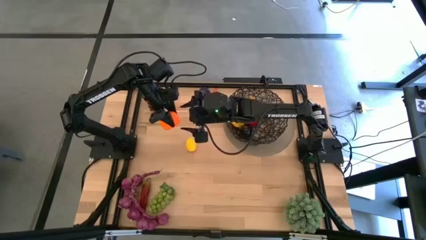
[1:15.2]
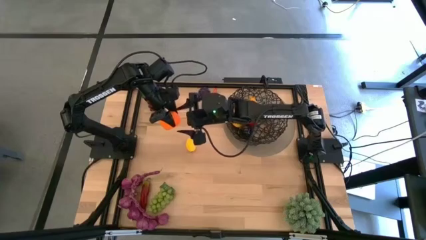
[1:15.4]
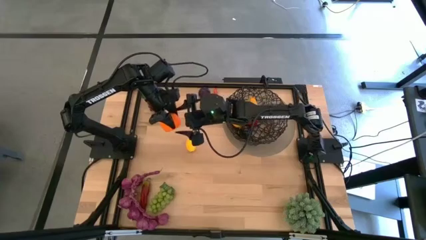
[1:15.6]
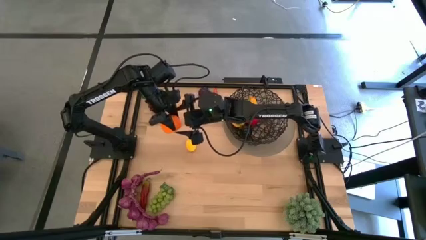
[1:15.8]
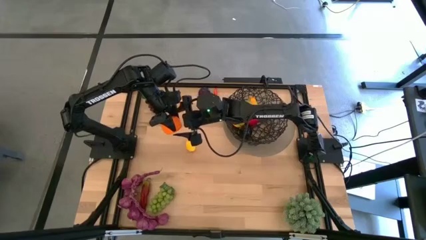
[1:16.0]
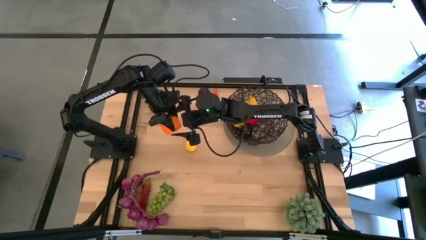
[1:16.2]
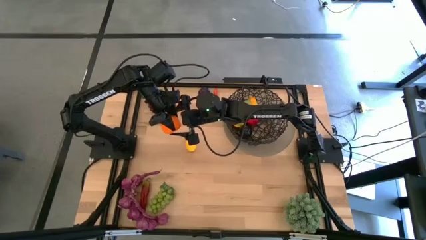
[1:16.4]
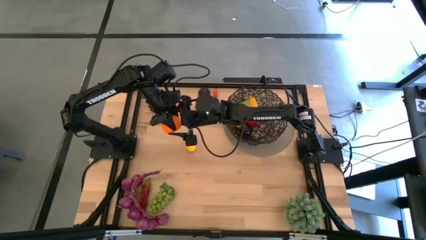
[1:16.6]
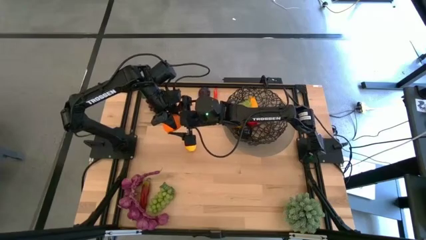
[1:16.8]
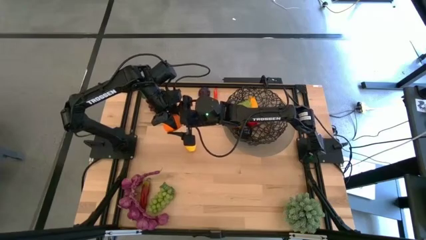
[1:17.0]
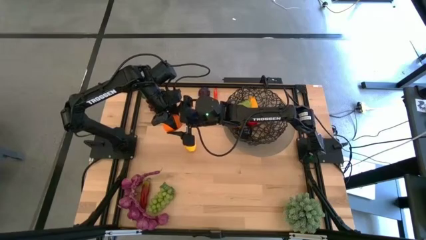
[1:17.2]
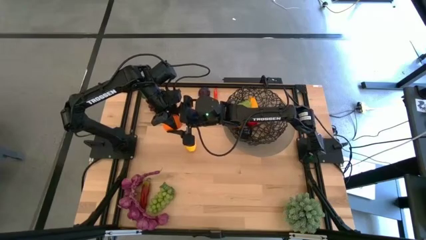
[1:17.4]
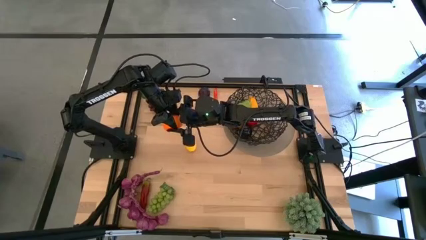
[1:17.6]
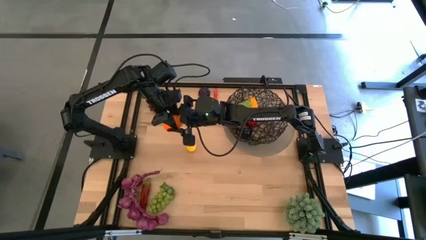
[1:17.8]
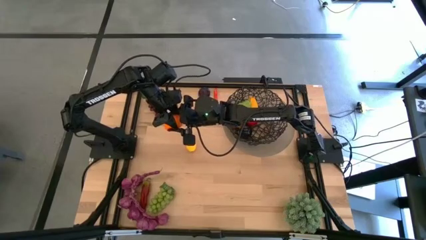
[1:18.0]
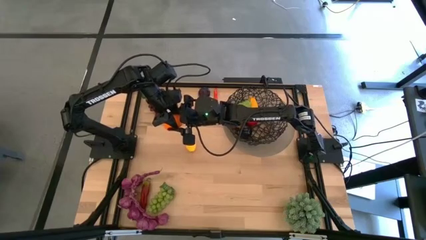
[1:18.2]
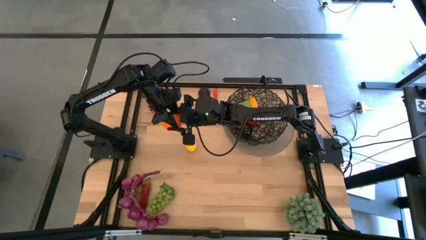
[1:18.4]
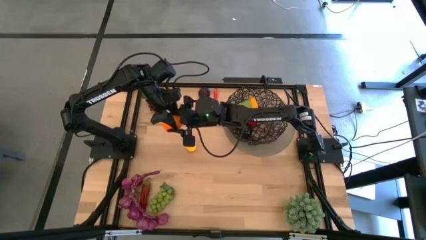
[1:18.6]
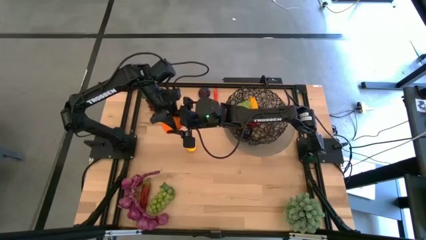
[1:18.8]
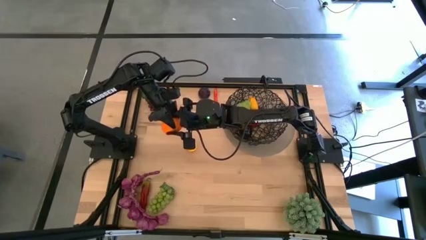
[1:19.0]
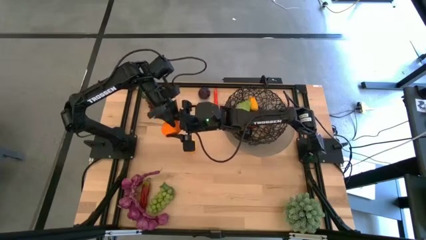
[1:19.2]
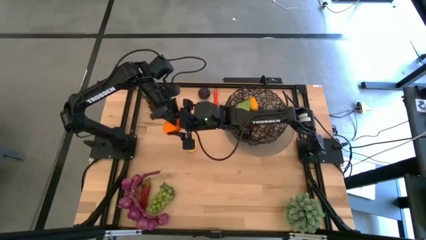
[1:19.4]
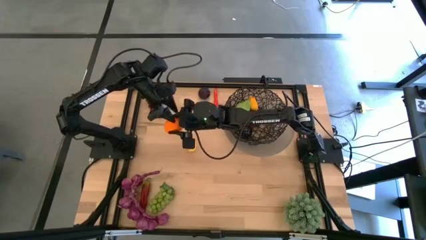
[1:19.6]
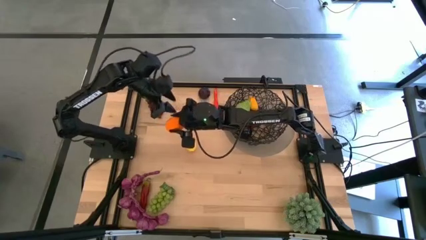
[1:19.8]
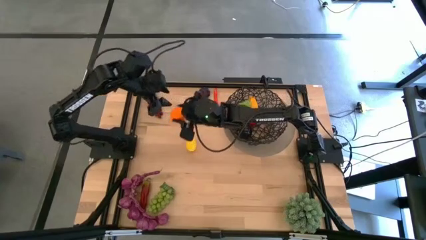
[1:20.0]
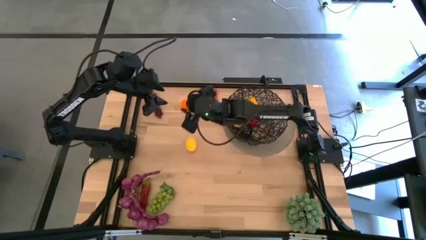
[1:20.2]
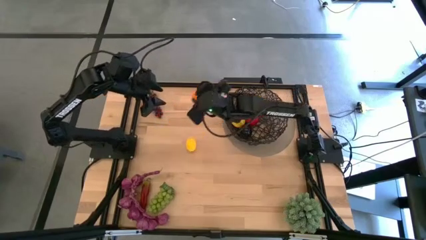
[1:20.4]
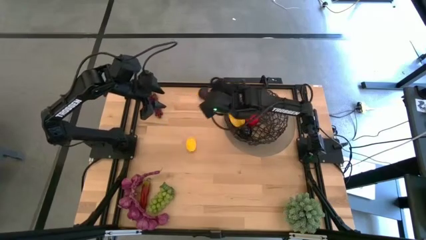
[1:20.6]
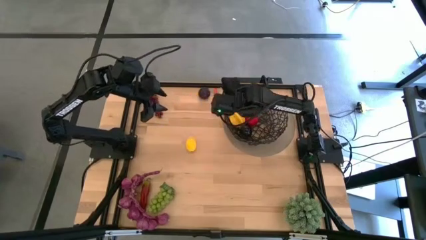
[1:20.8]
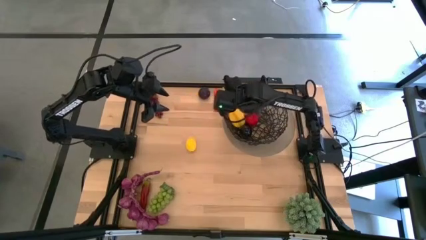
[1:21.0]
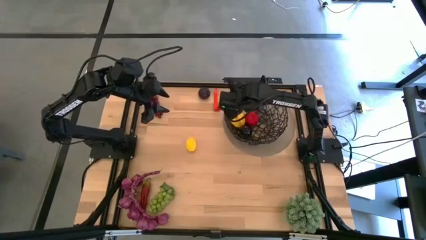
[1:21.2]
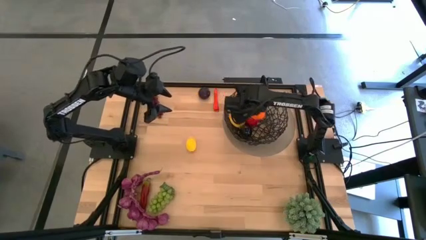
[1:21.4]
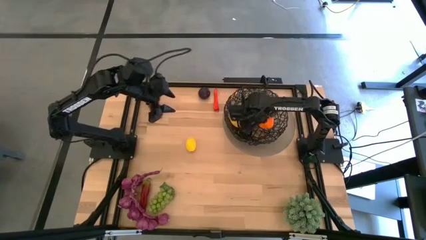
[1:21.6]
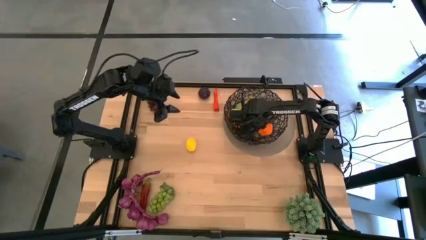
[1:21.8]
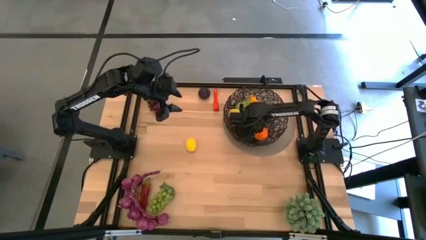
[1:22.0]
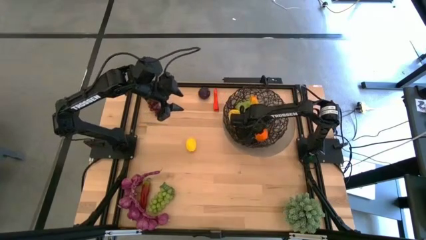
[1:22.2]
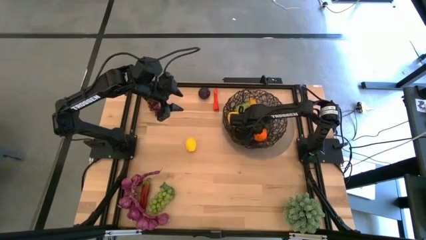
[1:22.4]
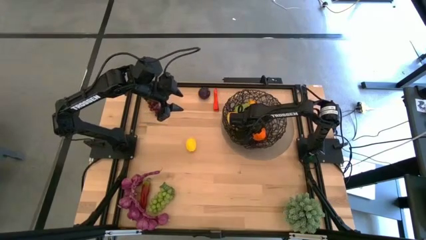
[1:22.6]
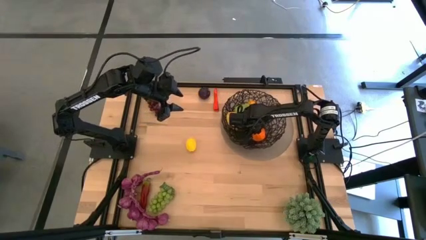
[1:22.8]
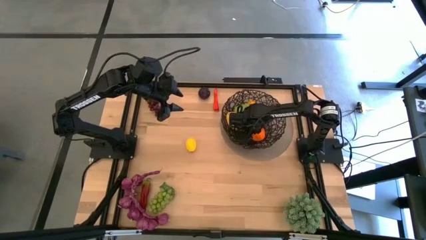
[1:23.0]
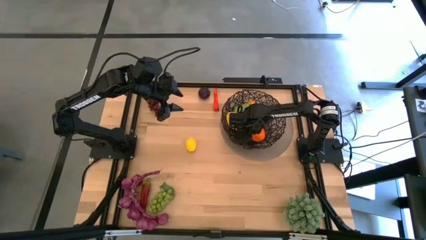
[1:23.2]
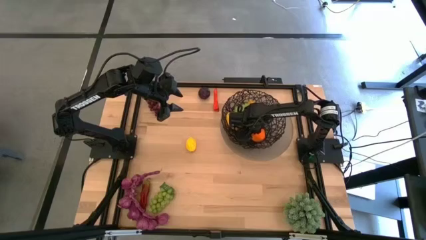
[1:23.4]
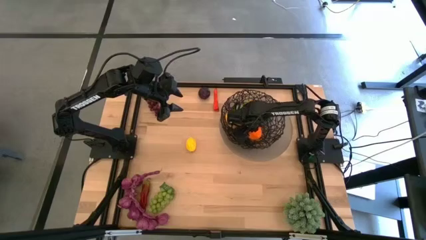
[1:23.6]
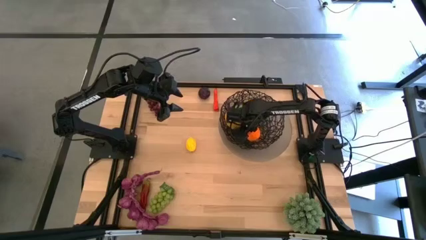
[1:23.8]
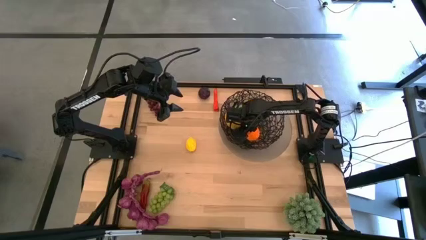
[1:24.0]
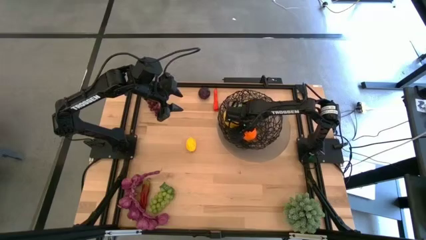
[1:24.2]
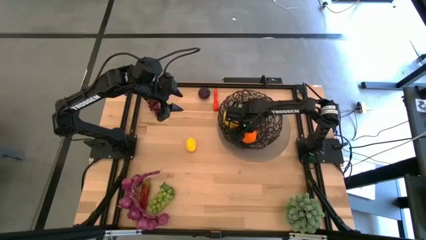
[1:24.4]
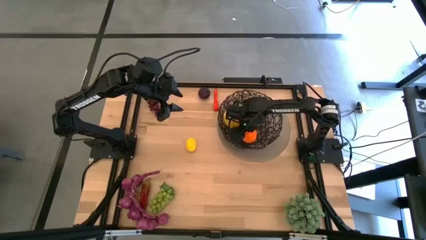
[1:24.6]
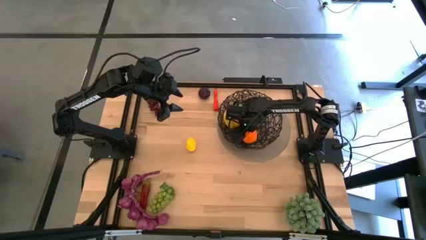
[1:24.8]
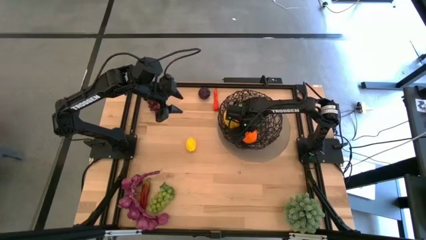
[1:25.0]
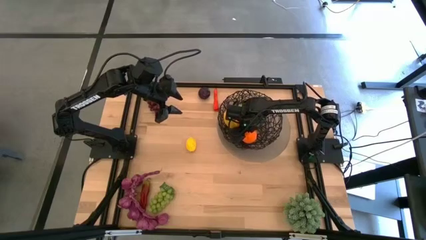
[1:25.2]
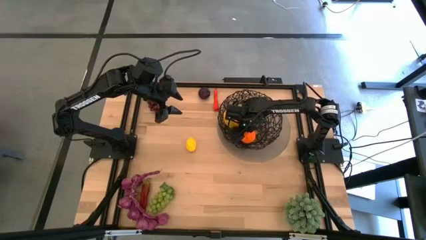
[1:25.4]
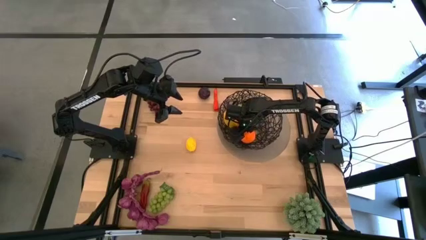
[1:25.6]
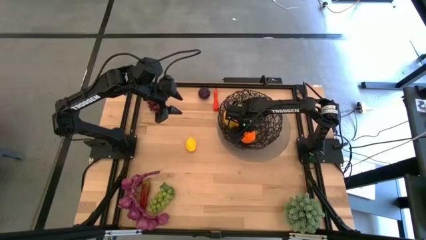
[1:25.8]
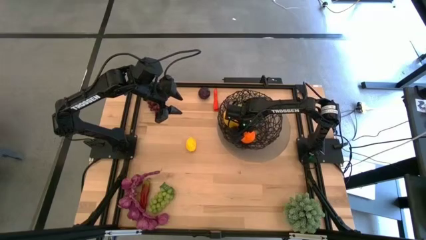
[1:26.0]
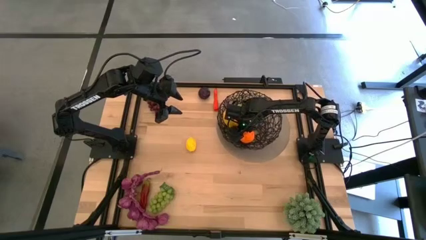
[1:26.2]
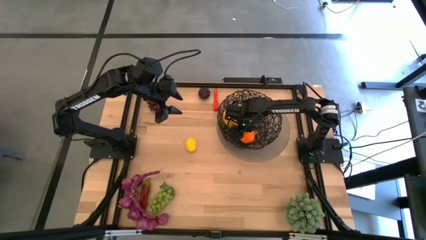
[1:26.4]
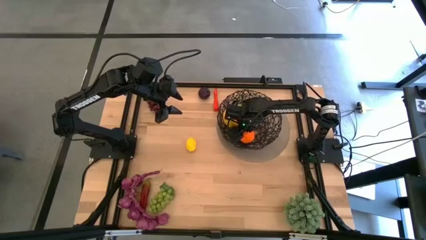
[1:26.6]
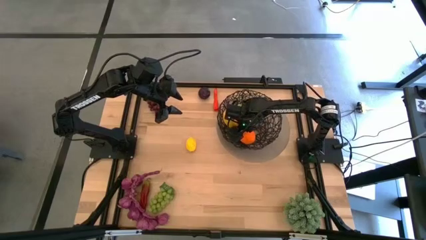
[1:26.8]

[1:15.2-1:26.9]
Task: Build produce basket
Put the orange into the black wire basket

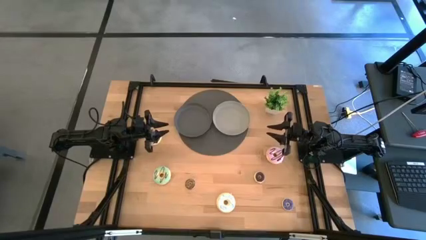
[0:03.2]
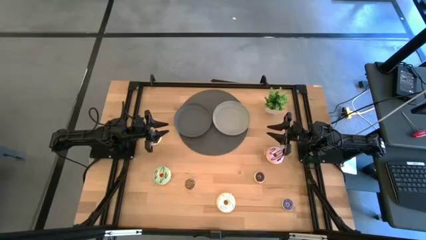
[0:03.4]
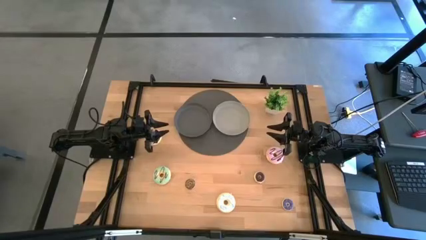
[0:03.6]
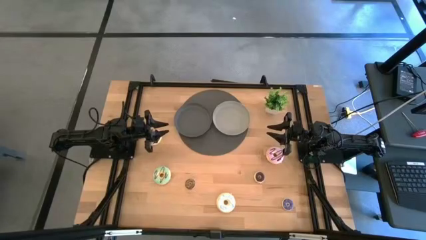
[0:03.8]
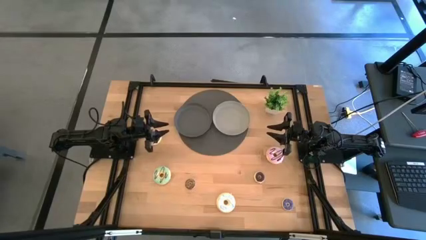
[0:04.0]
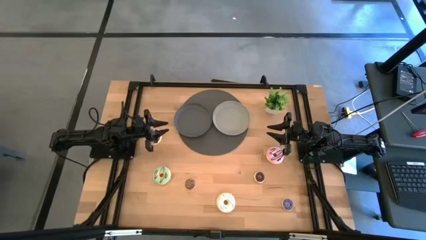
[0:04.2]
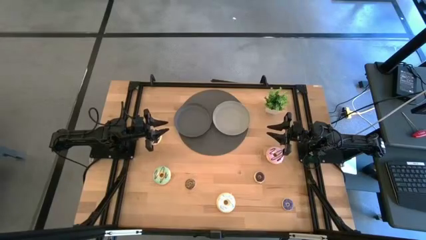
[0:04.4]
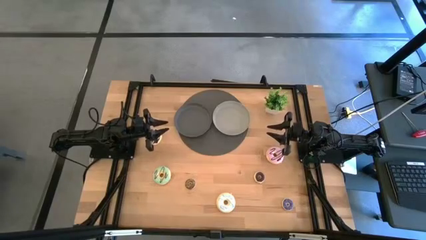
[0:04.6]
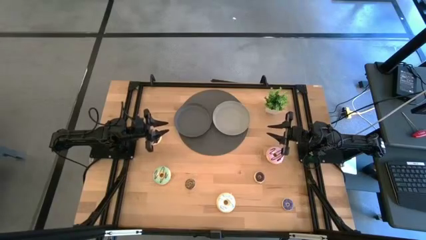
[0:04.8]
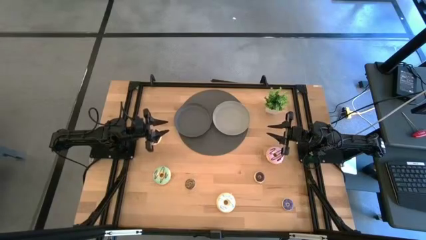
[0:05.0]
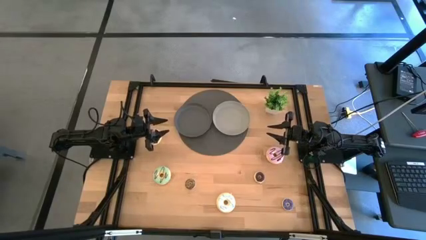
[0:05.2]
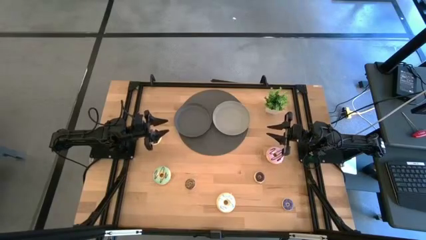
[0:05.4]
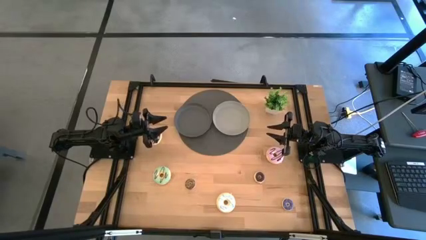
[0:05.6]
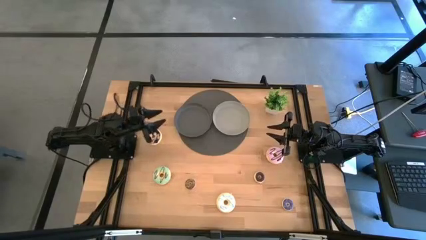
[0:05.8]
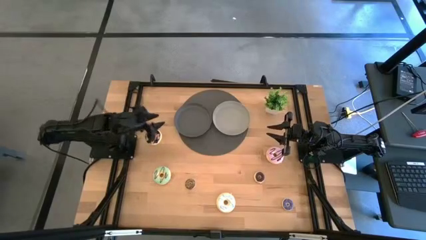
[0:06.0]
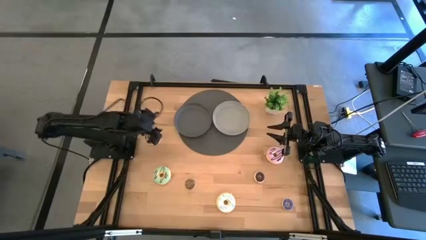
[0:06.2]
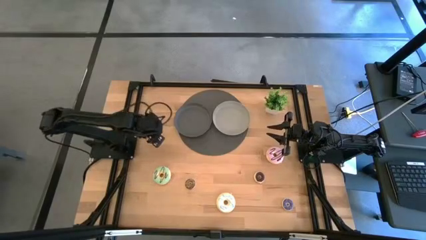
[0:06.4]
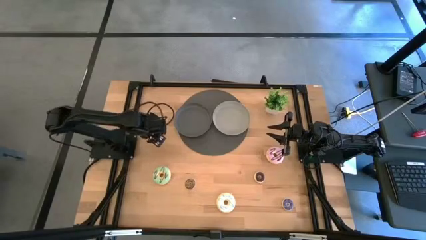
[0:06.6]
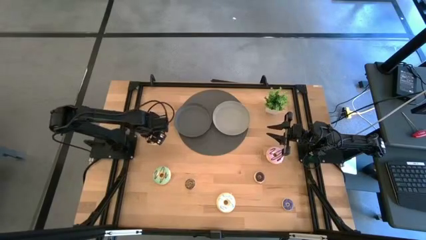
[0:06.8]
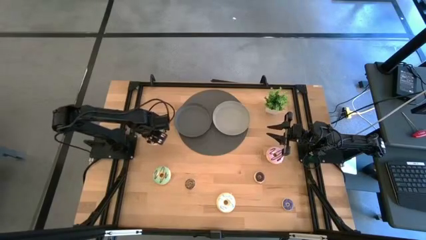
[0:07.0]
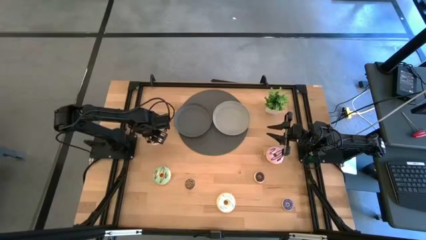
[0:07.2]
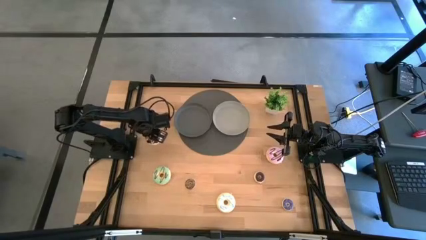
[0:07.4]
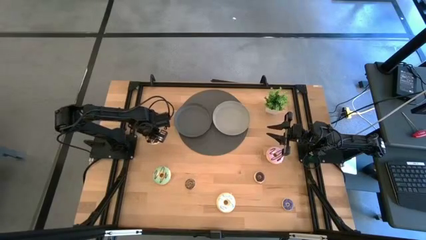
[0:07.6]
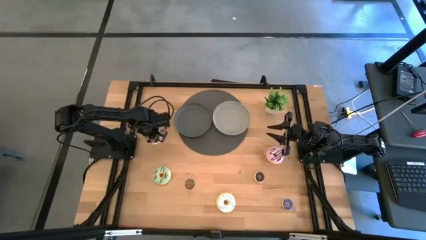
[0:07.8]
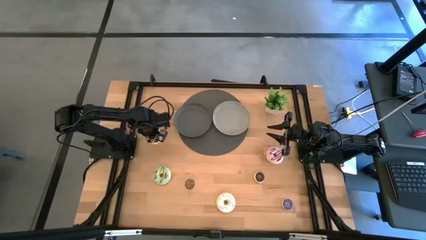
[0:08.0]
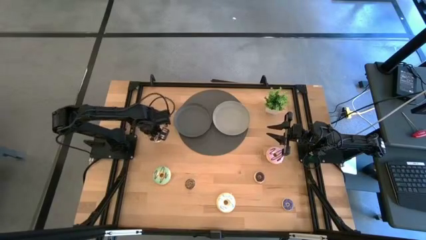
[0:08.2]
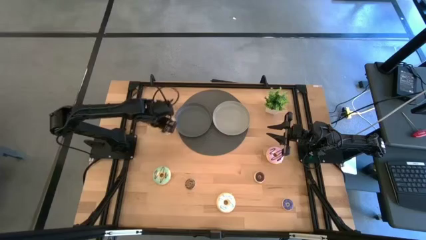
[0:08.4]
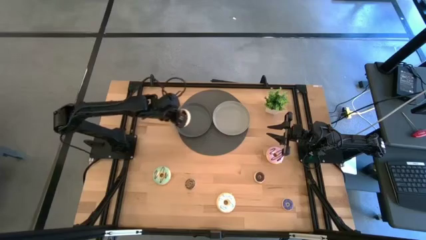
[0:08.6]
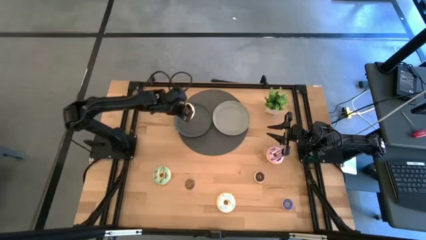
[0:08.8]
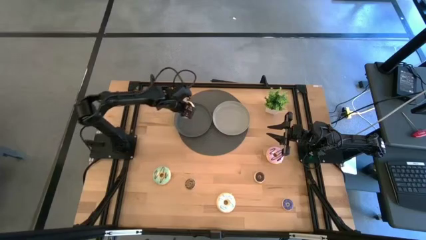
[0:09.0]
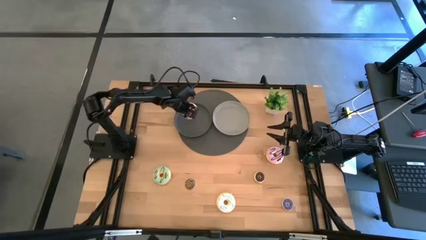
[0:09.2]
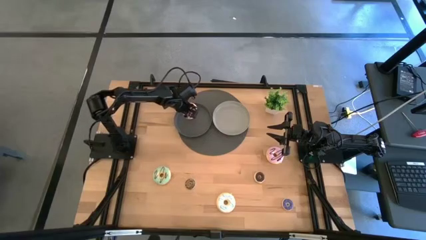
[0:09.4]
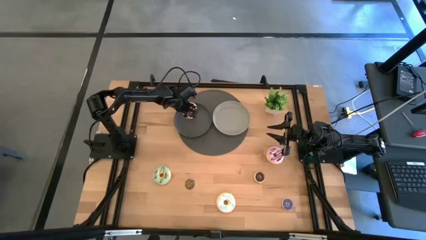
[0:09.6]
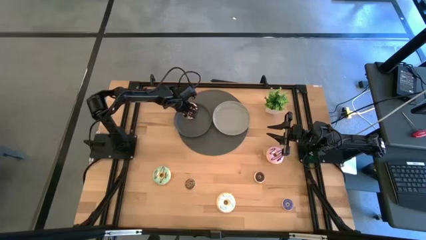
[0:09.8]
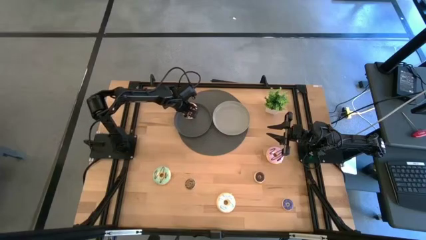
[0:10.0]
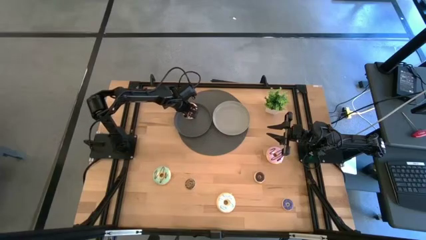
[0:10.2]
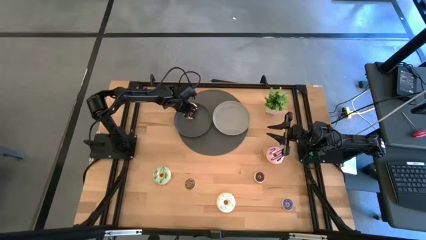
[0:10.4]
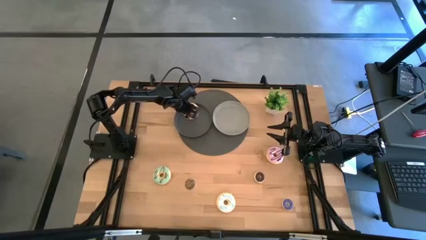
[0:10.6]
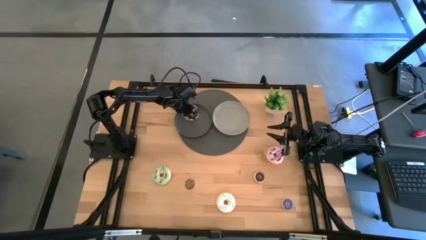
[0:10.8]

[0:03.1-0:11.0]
Task: Pick & Place donuts
Put the big black doughnut on the dark gray plate
